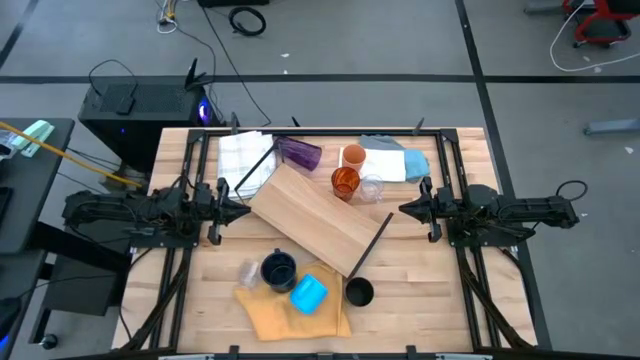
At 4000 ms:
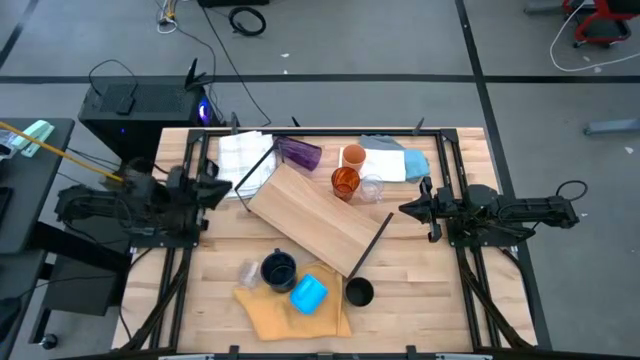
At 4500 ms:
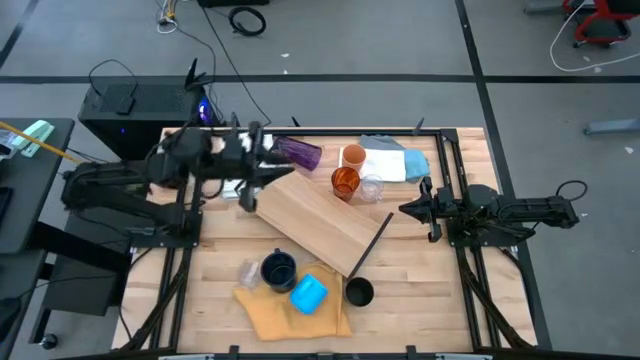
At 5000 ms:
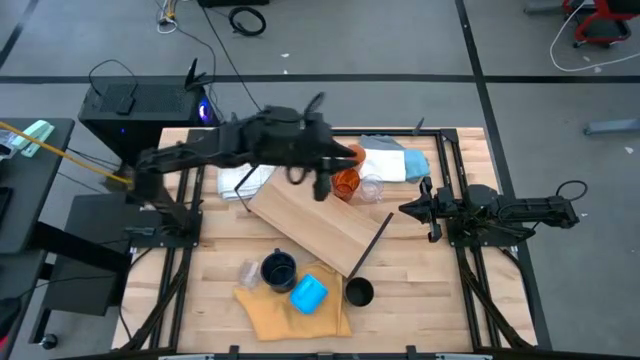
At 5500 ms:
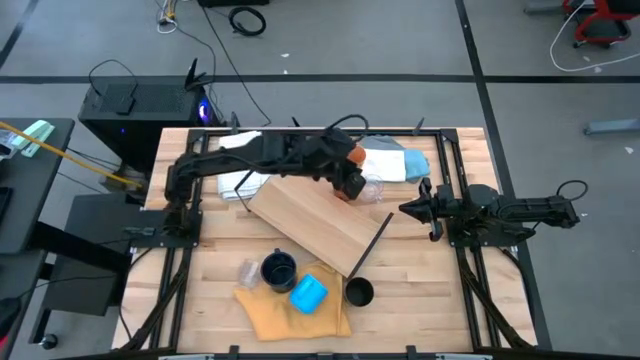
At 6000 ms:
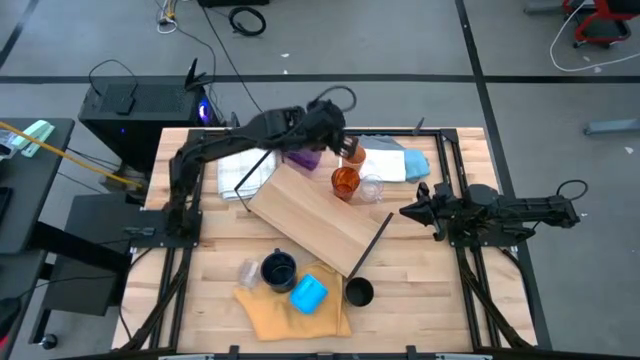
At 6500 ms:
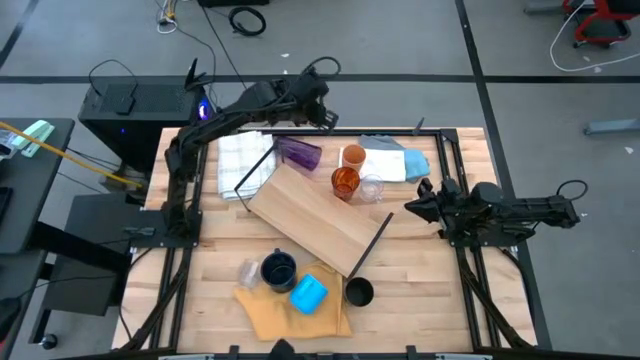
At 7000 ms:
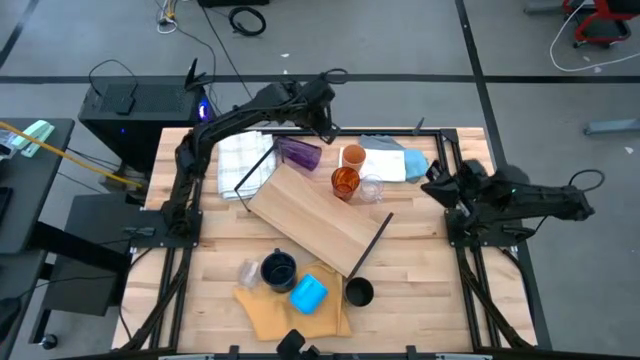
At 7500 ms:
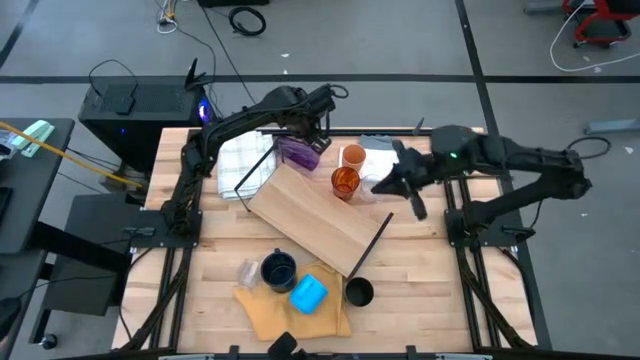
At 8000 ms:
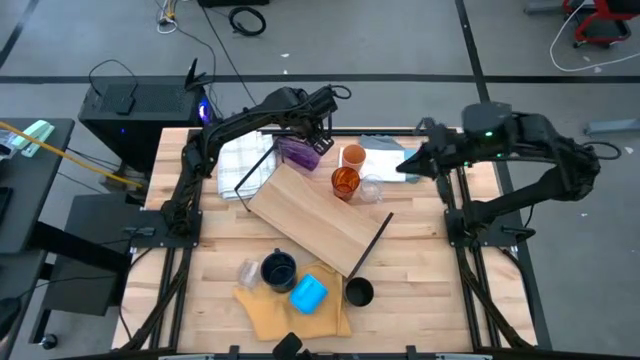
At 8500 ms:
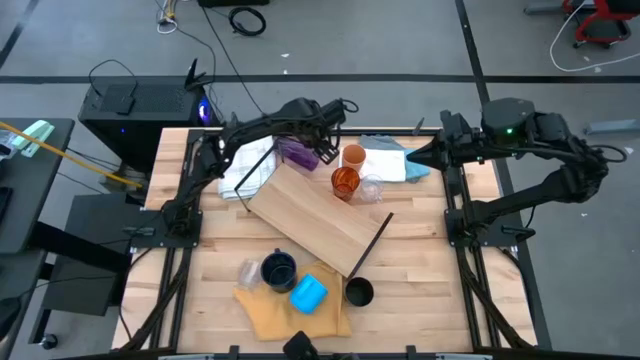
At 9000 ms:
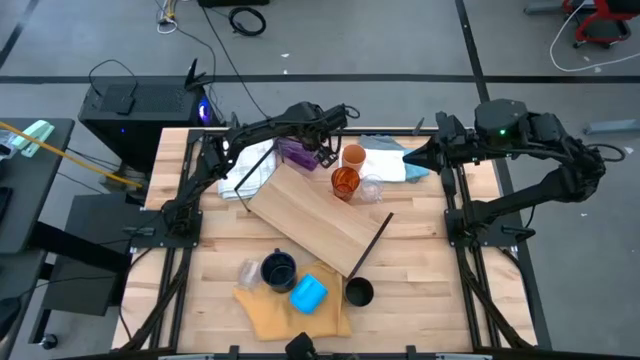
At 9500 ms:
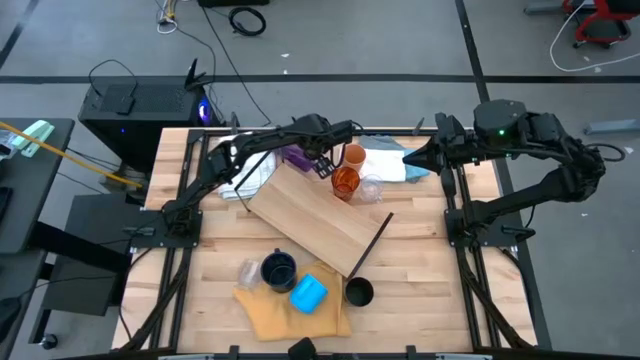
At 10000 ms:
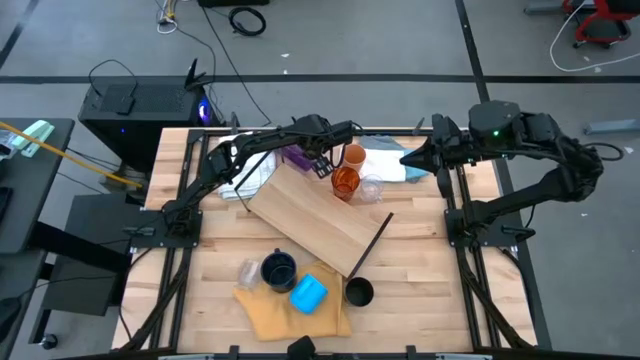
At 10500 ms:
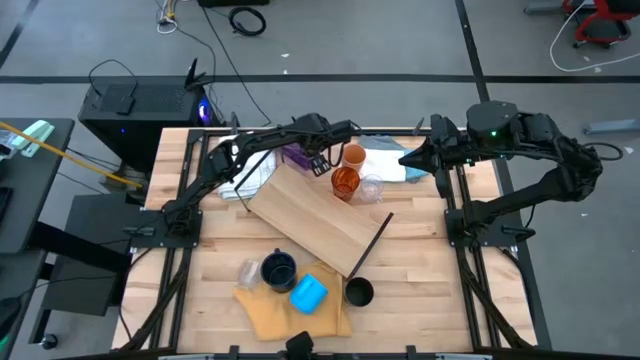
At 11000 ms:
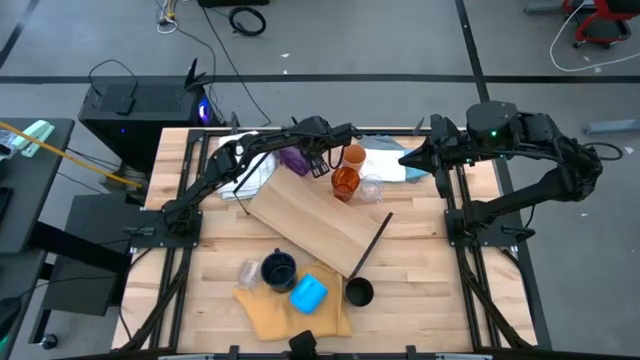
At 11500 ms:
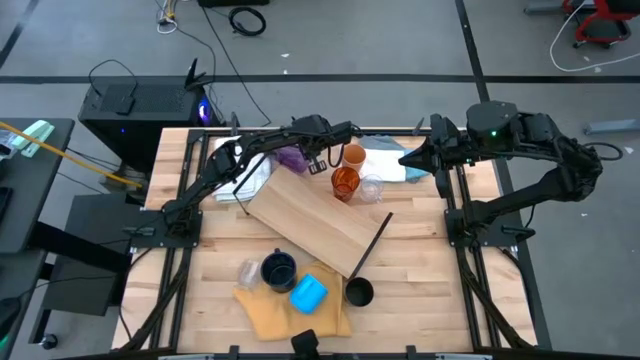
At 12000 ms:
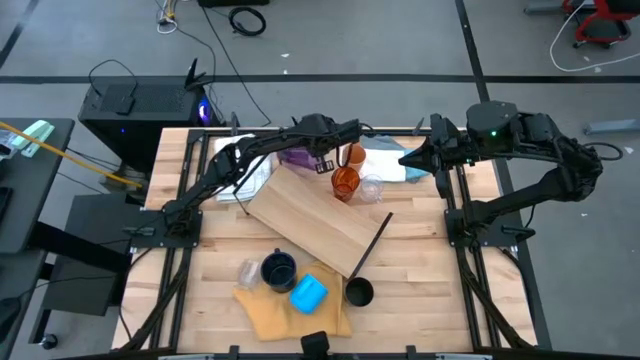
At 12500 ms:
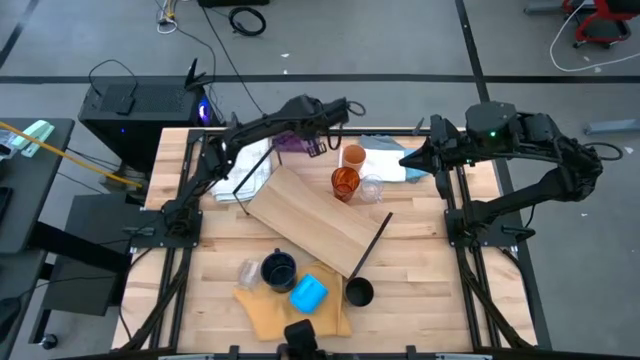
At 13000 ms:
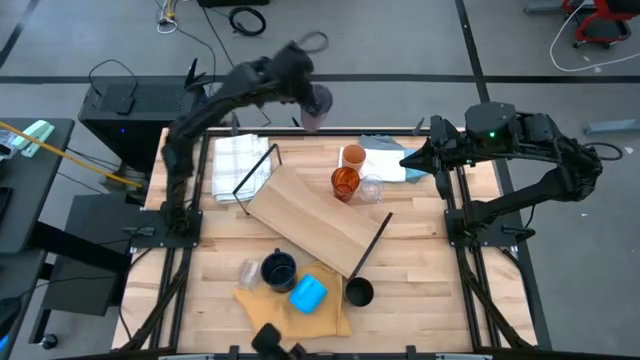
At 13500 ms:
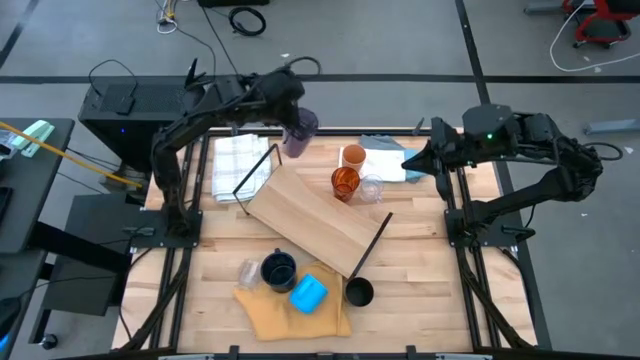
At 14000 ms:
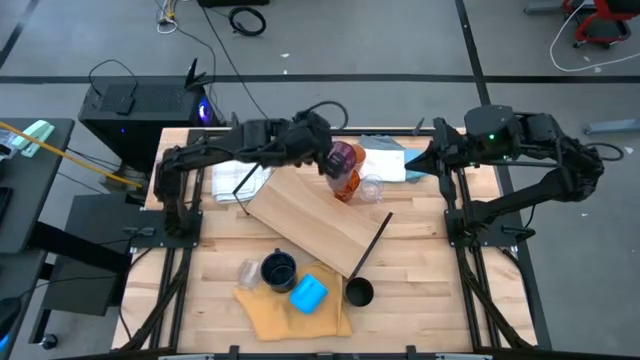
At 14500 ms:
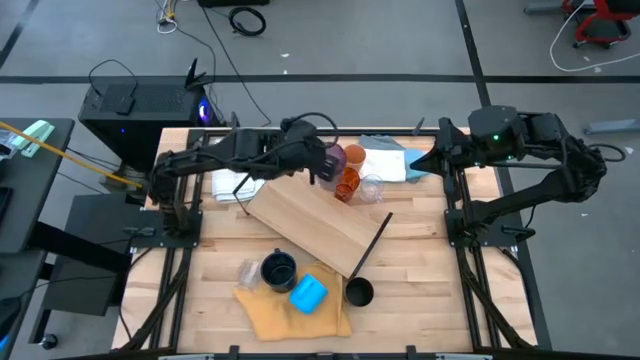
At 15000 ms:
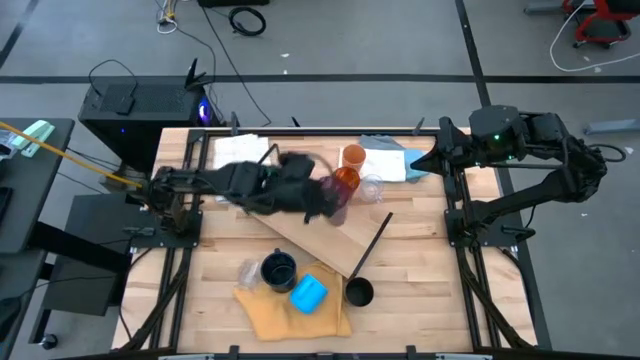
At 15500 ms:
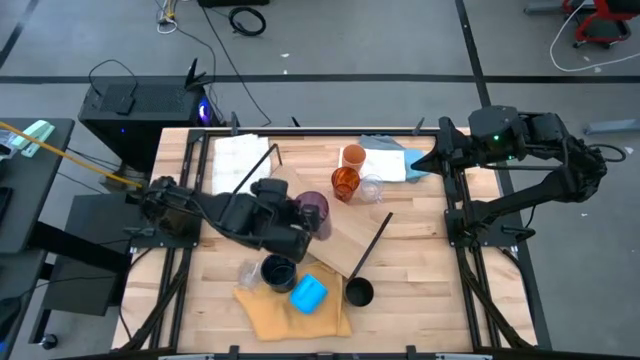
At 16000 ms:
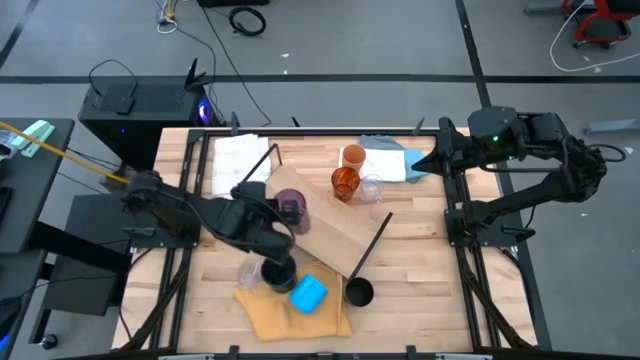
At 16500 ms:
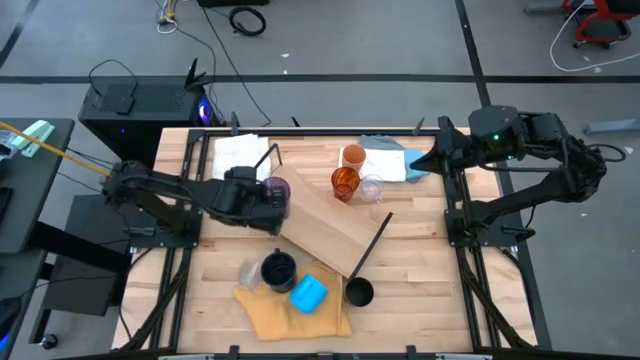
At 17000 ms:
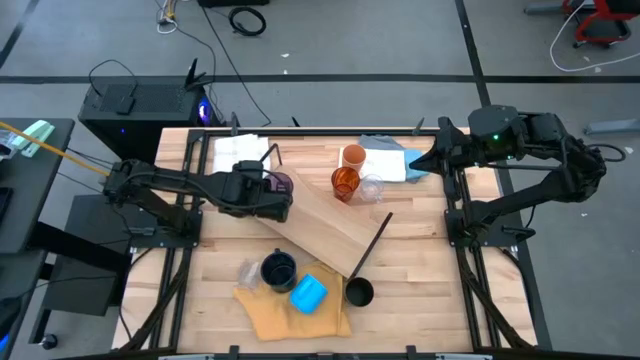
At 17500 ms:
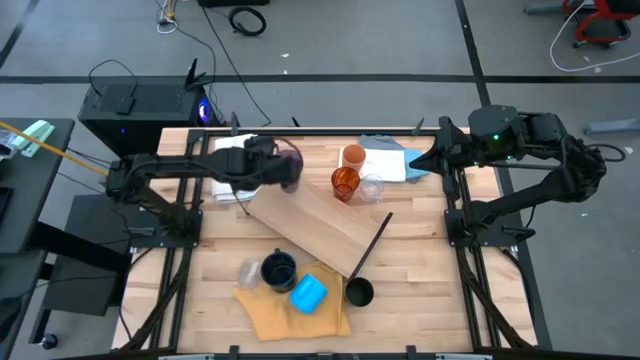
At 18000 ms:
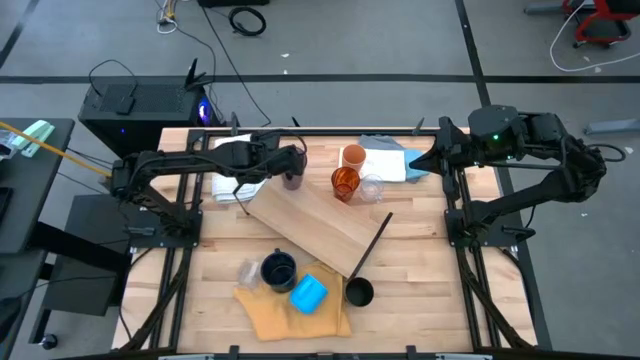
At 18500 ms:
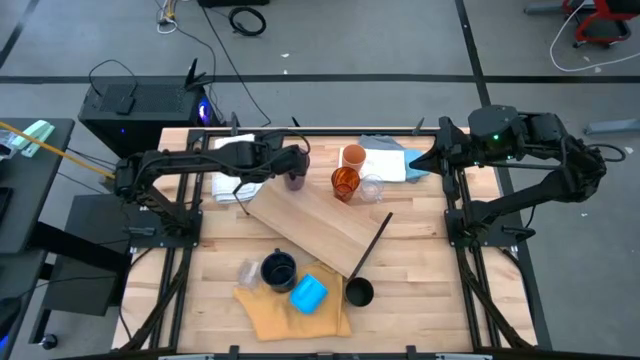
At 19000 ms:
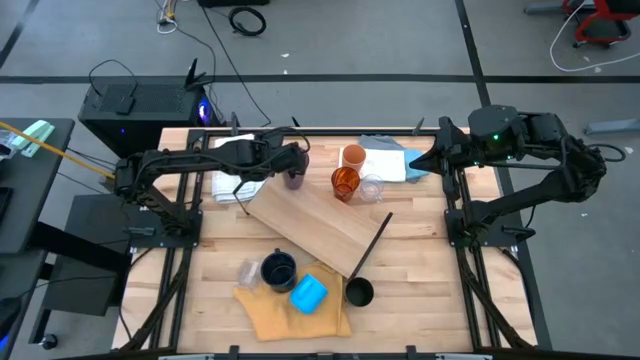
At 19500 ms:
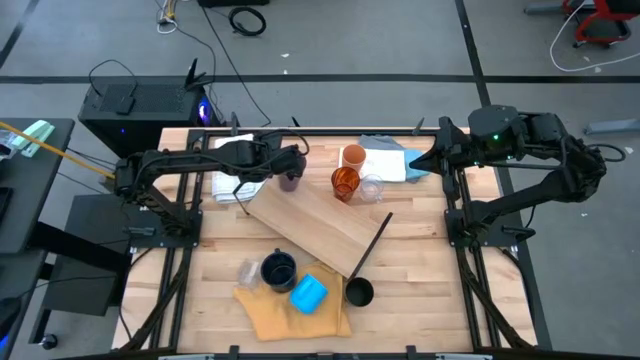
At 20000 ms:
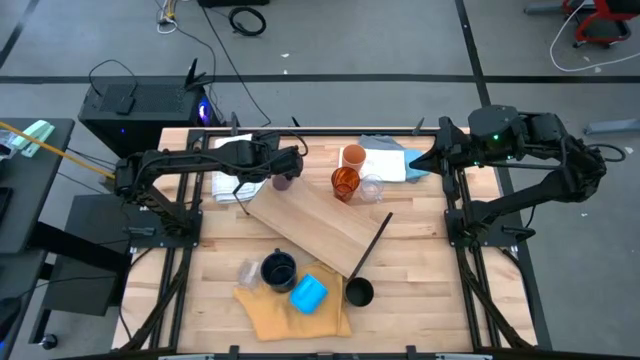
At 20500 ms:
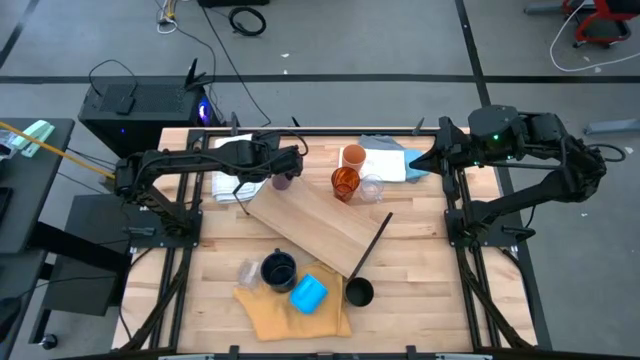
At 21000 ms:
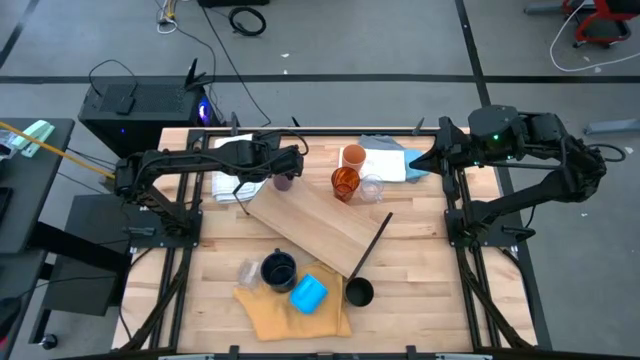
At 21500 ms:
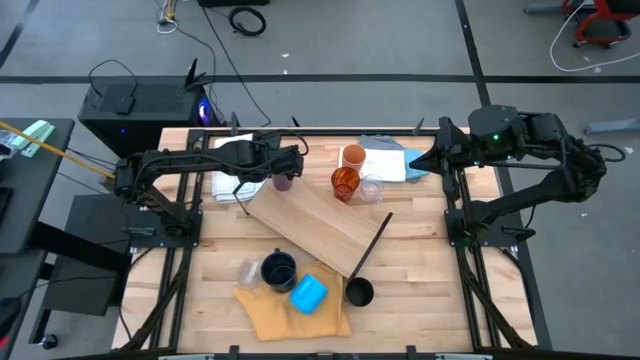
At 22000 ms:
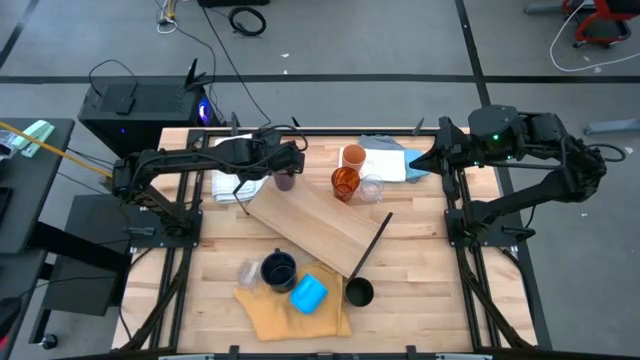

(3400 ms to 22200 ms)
Task: Stack small to large cups/mugs on shelf
Put the purple cup on the shelf
